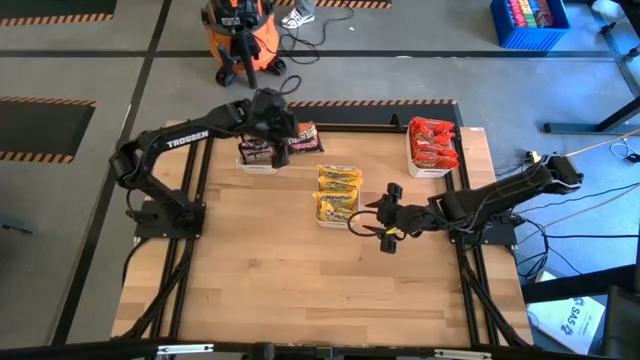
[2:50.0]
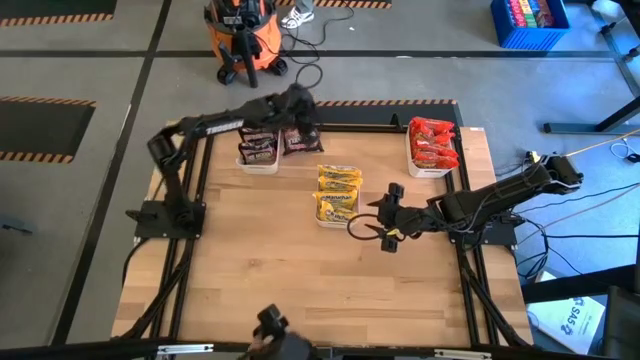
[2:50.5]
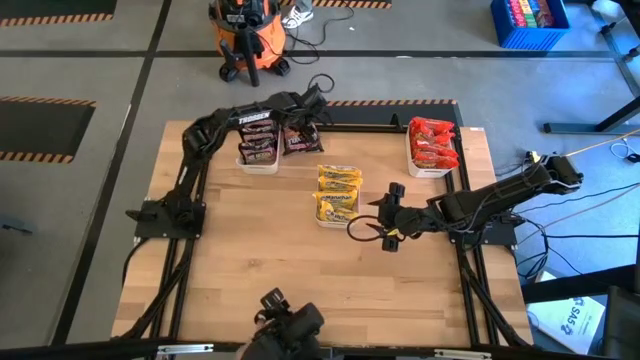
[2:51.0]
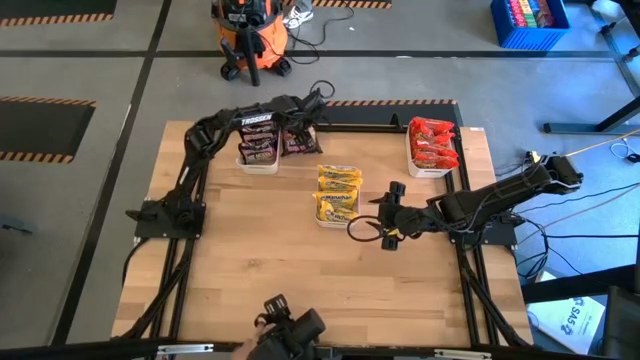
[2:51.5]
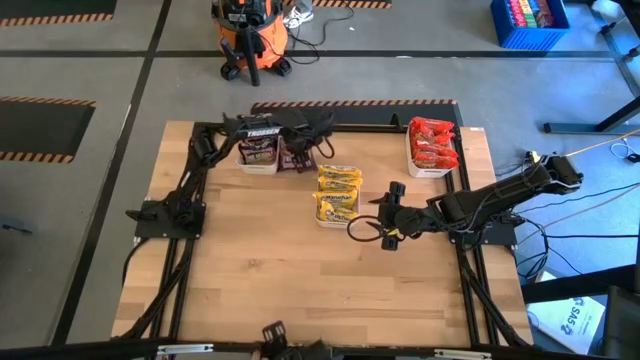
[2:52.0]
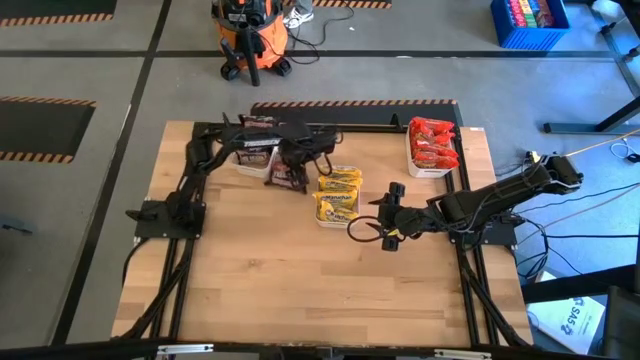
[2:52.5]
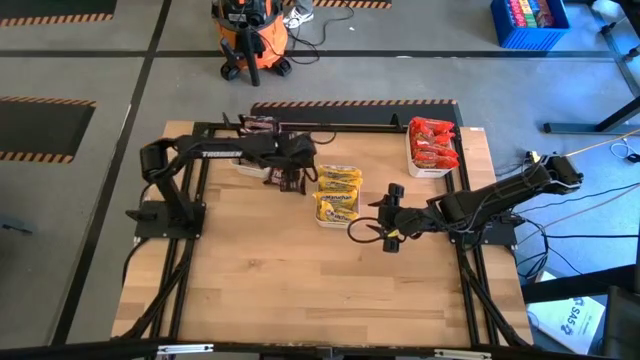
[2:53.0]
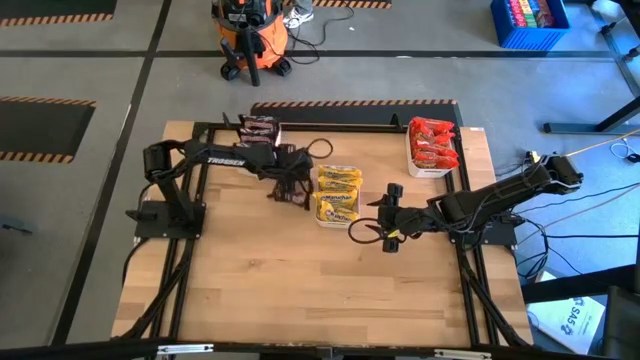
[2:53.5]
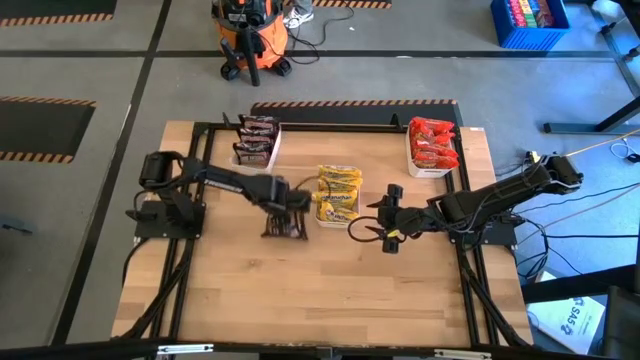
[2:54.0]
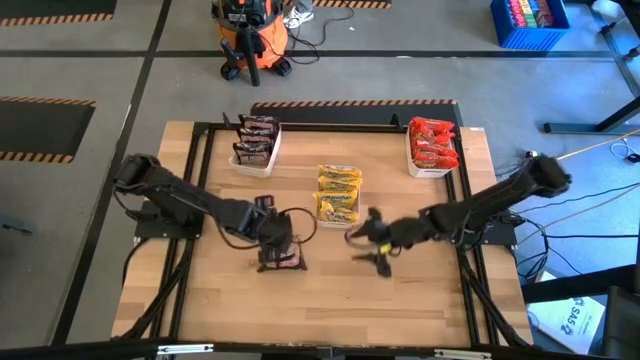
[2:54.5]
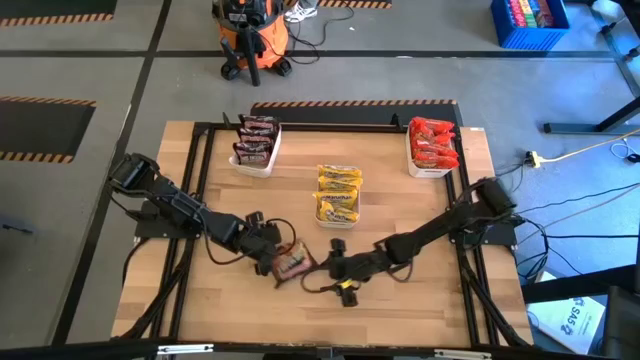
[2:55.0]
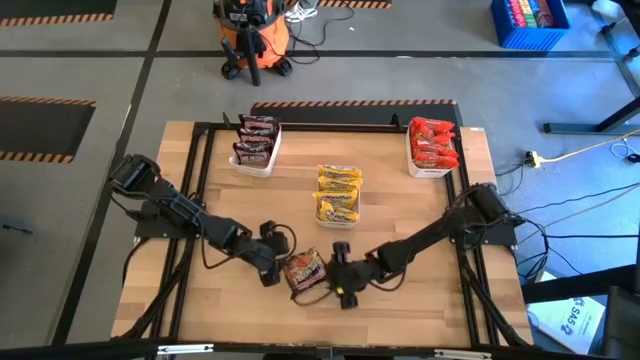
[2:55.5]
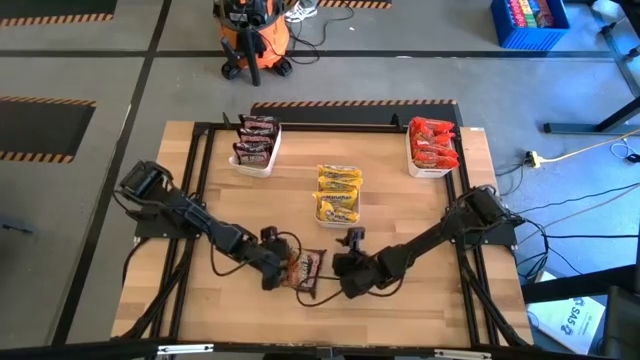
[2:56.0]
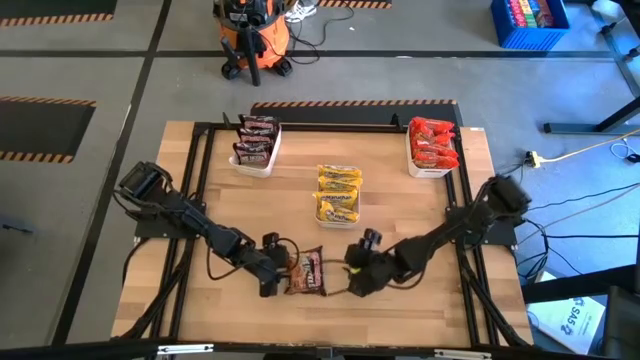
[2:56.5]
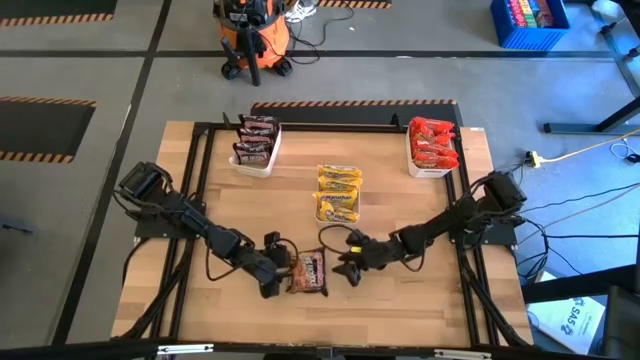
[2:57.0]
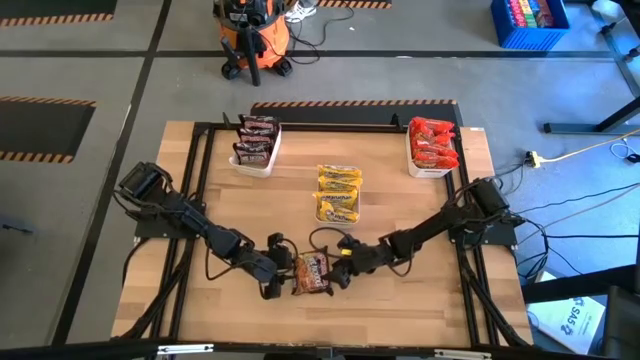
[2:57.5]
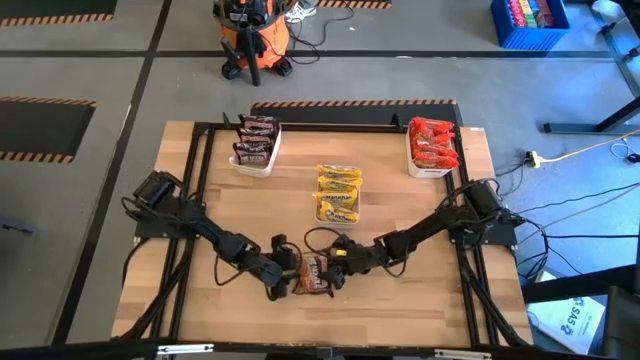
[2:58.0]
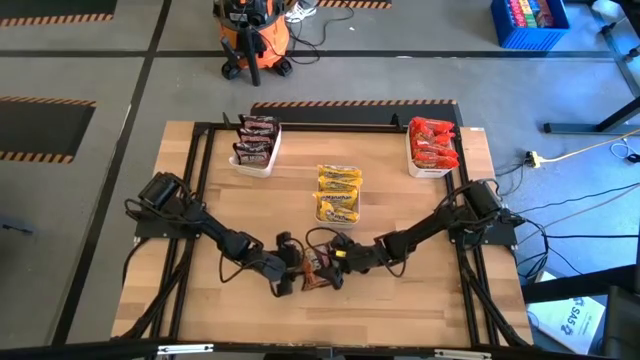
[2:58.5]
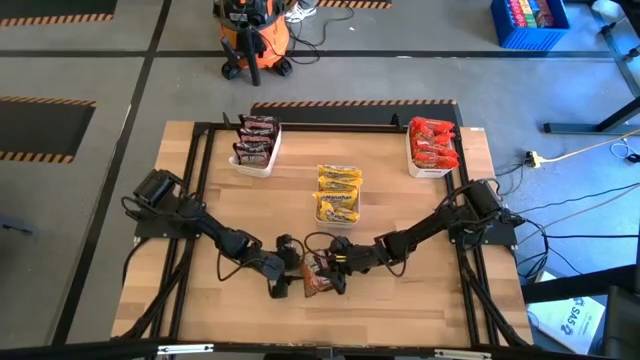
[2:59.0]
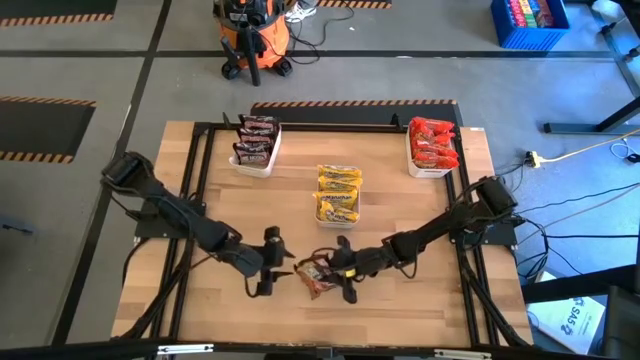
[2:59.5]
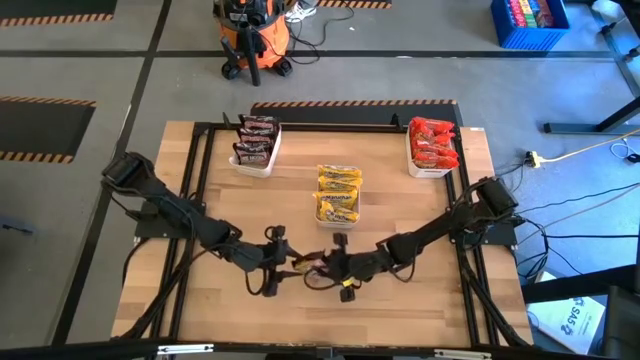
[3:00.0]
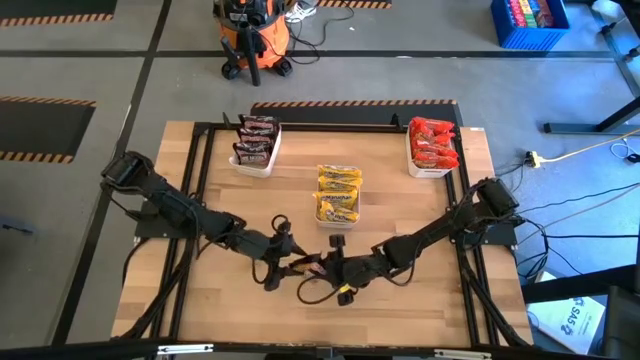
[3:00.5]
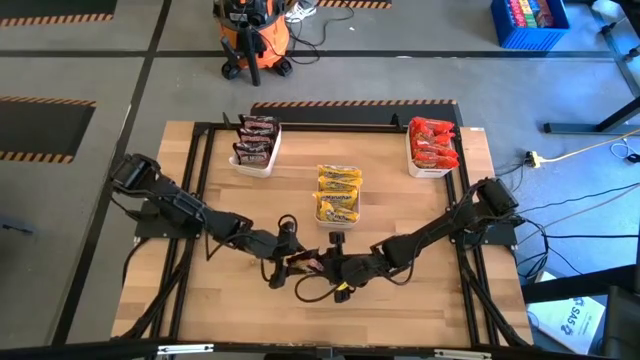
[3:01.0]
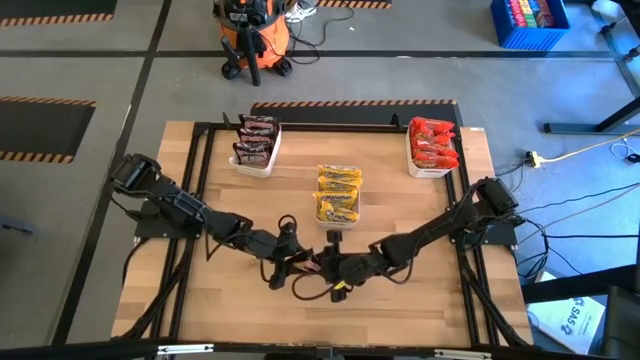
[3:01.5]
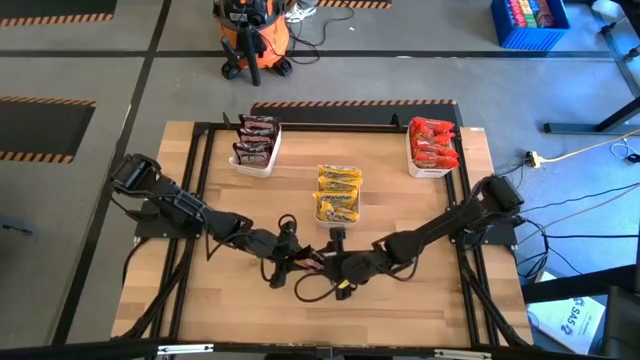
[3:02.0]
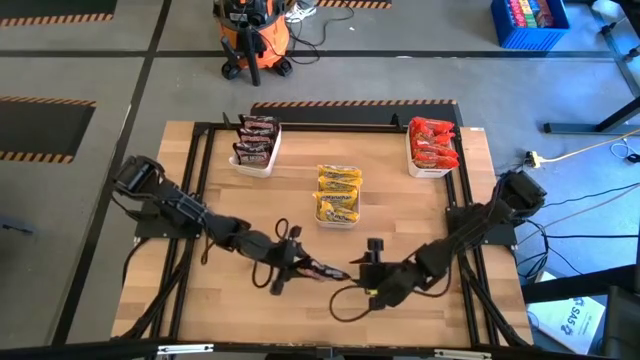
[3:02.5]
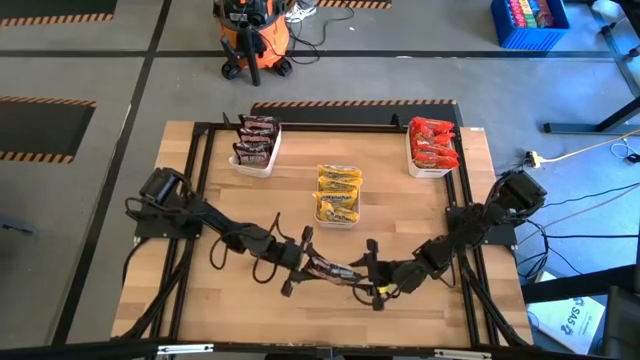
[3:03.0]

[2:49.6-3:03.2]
Task: Sort Maruchan noodles
Put the black noodle pack into the white left bin

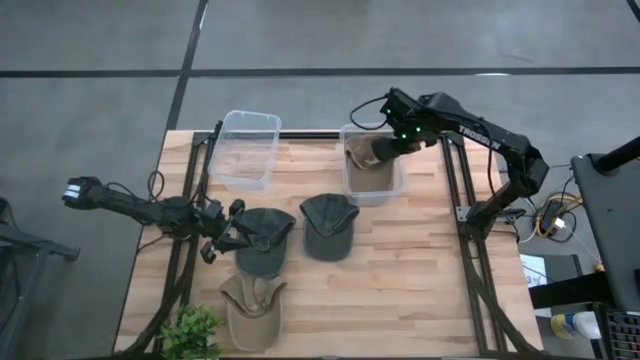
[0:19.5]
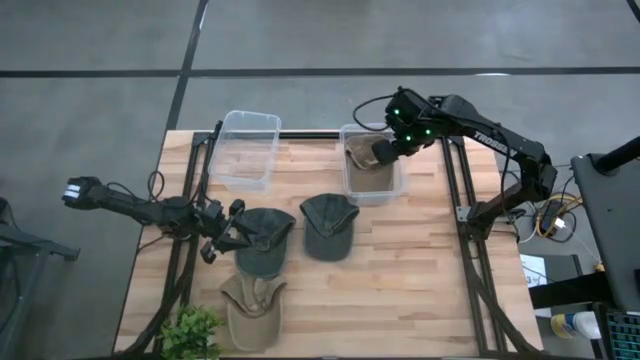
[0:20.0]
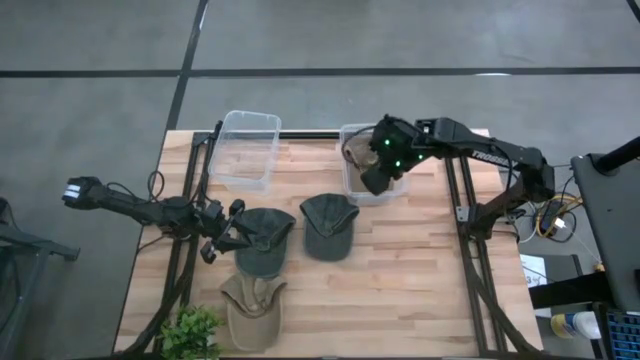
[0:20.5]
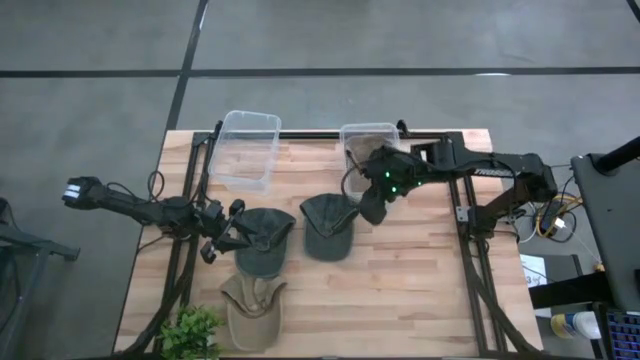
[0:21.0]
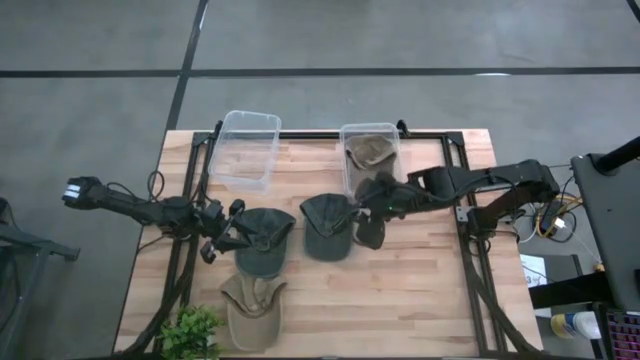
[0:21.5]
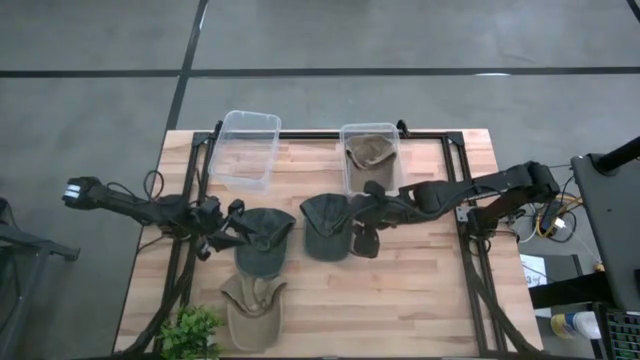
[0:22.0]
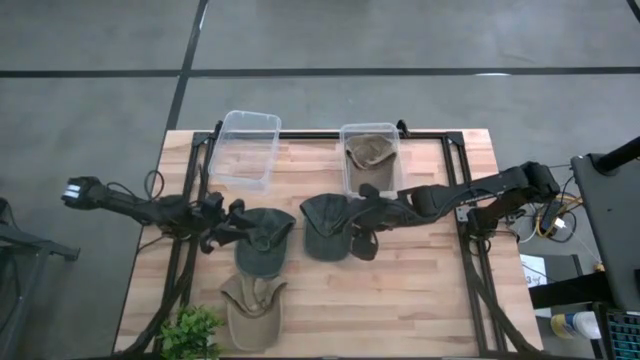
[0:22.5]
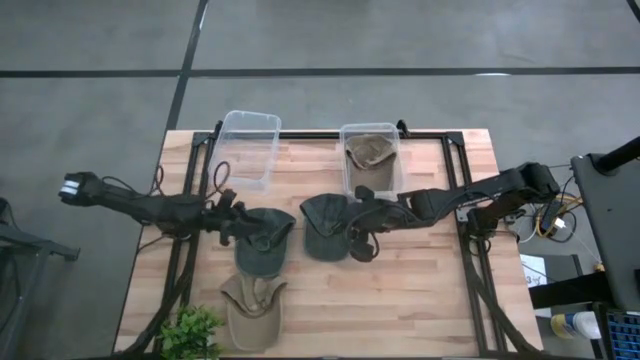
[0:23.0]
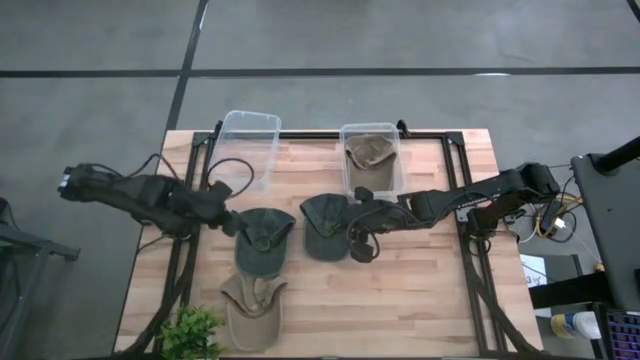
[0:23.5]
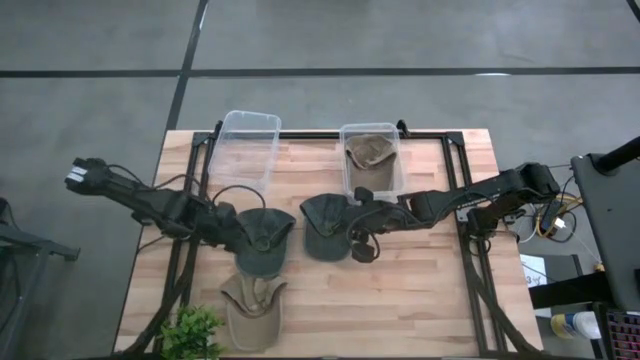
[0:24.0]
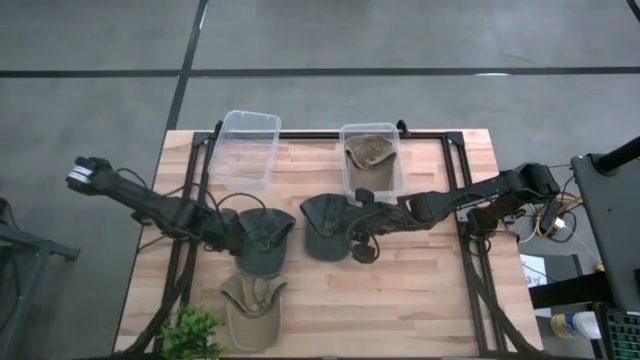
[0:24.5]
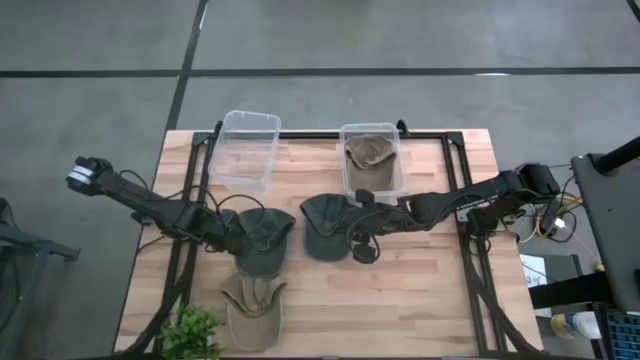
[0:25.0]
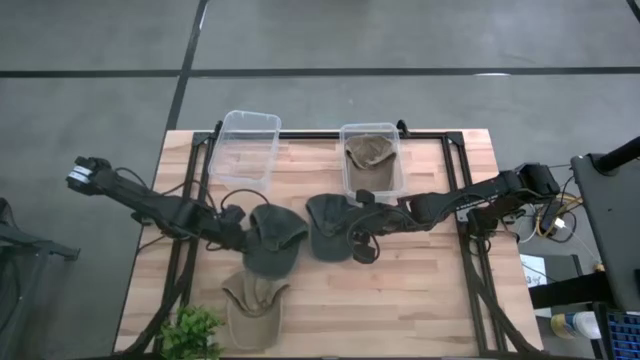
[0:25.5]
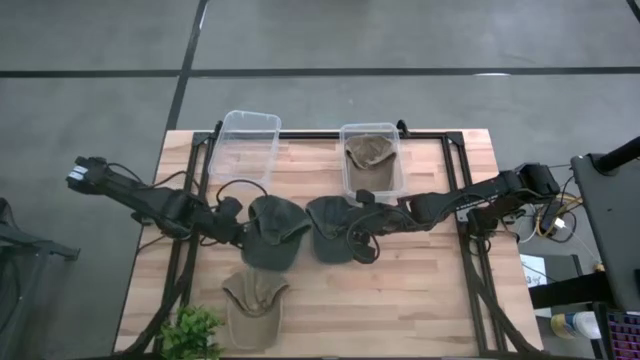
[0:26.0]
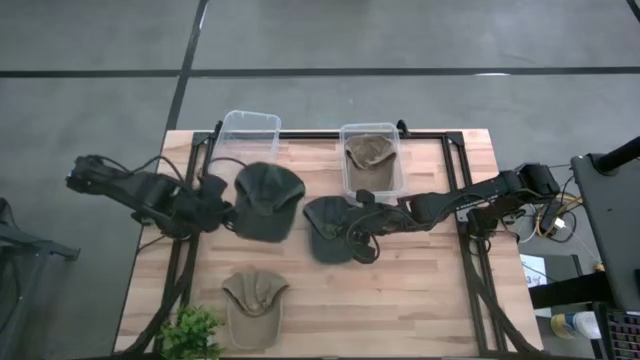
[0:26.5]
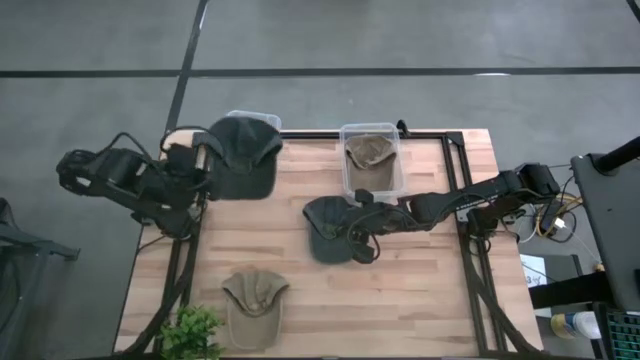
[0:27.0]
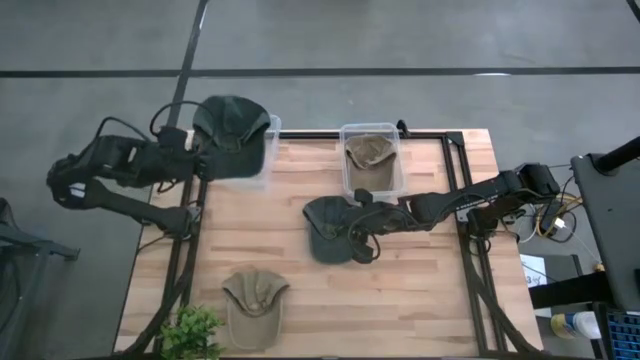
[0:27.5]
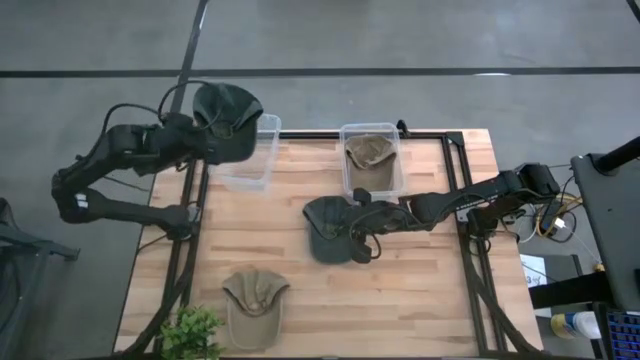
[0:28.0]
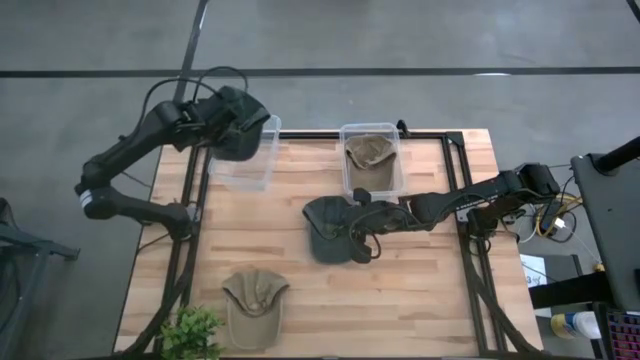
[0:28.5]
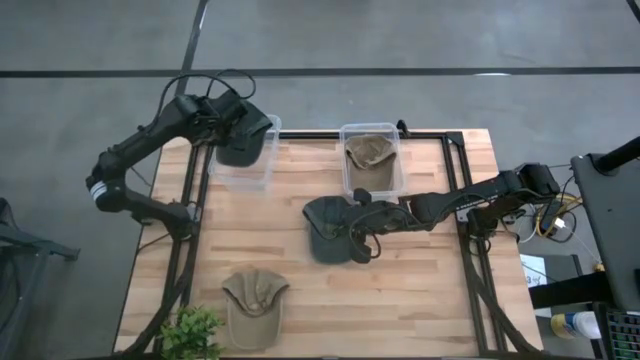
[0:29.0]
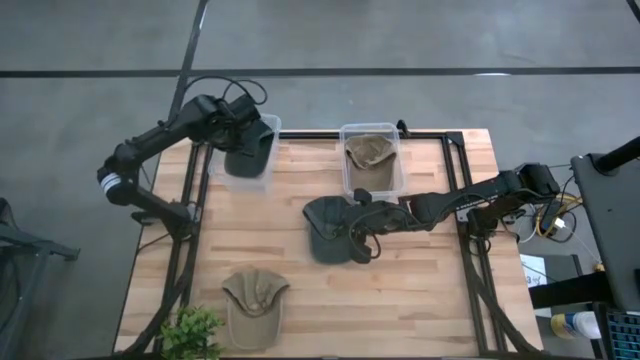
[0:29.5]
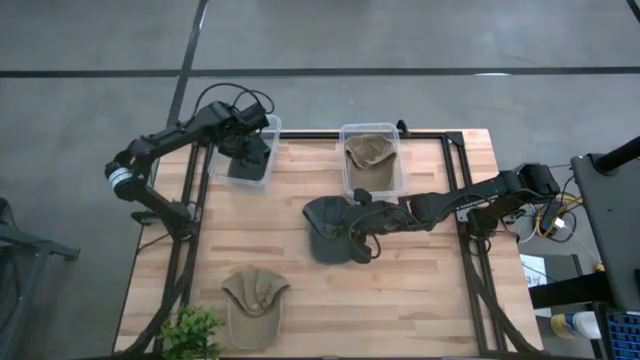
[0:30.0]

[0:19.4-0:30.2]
Task: Pick & Place hat
Put the left black cap into the left transparent bin
